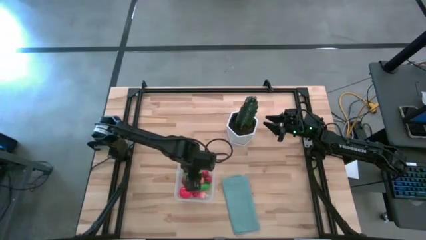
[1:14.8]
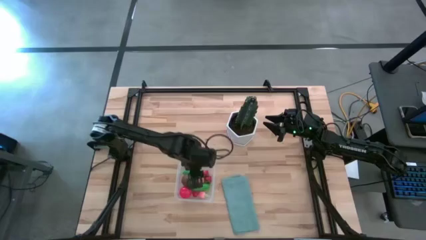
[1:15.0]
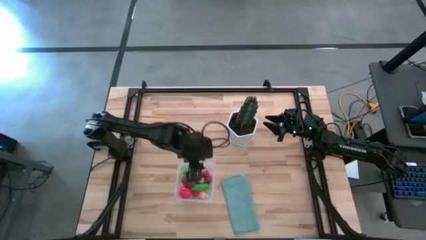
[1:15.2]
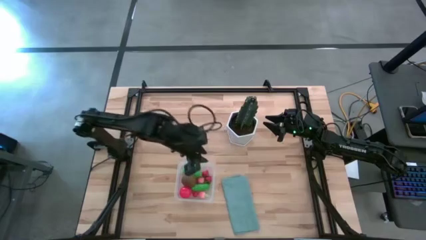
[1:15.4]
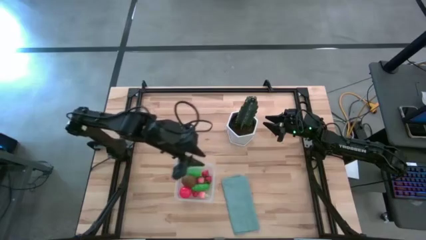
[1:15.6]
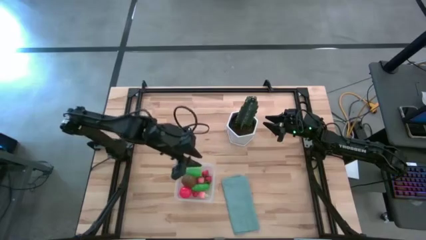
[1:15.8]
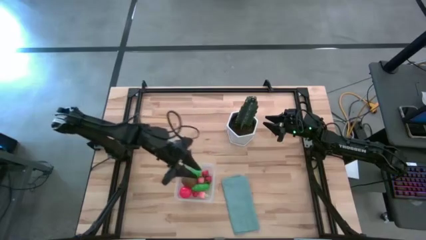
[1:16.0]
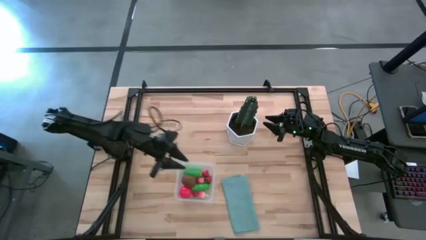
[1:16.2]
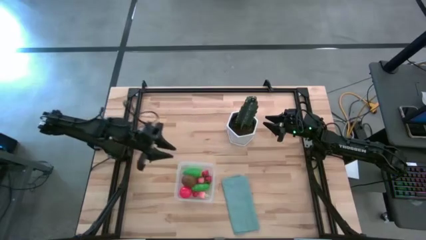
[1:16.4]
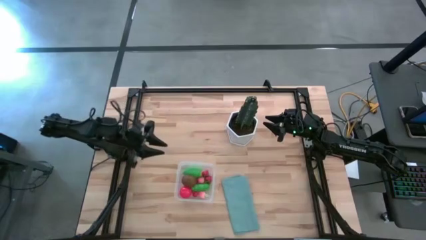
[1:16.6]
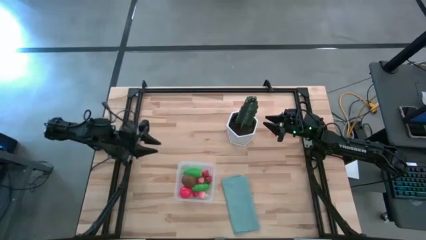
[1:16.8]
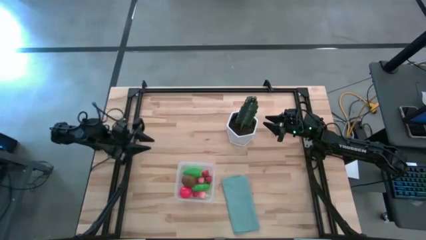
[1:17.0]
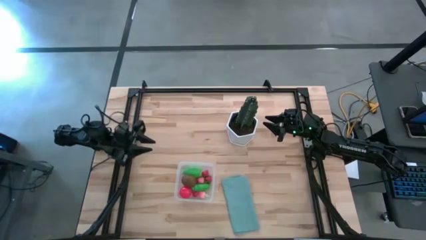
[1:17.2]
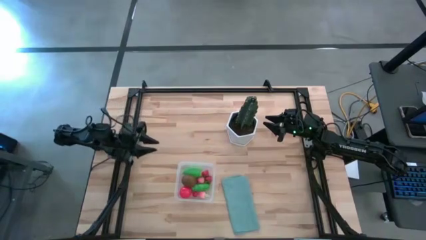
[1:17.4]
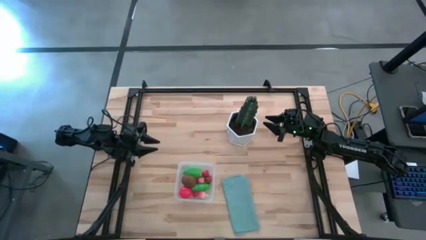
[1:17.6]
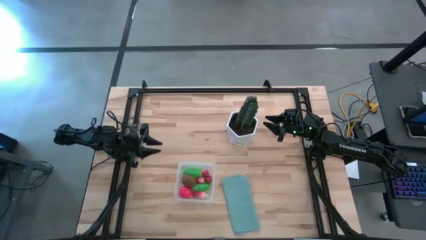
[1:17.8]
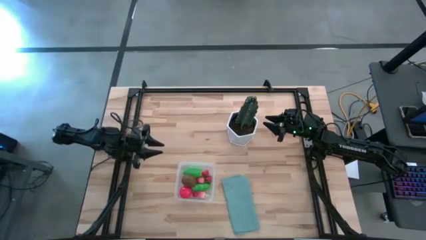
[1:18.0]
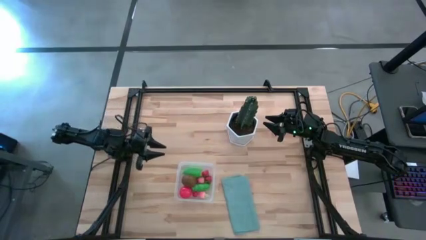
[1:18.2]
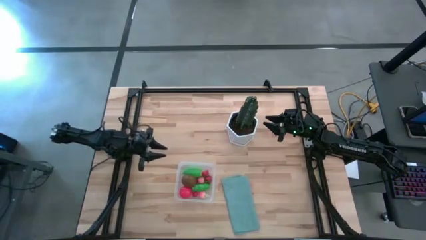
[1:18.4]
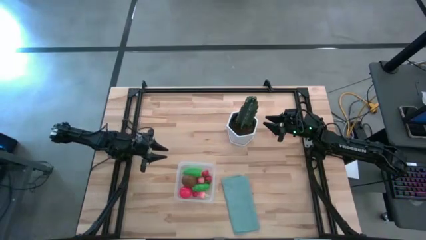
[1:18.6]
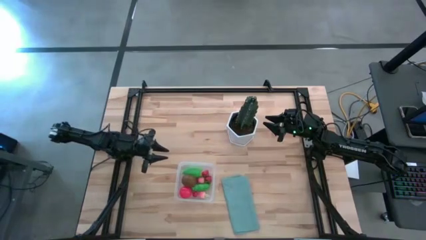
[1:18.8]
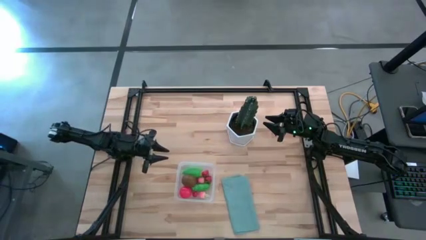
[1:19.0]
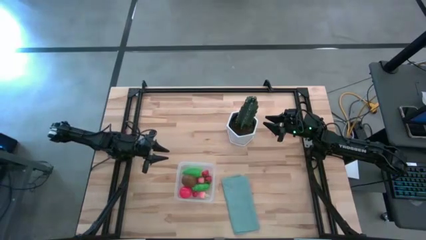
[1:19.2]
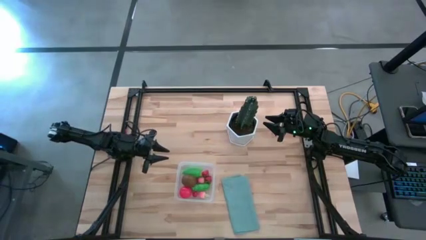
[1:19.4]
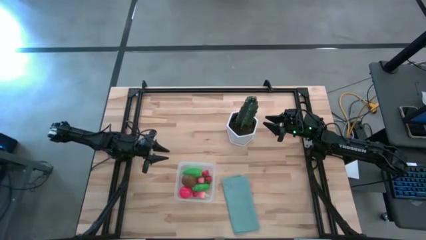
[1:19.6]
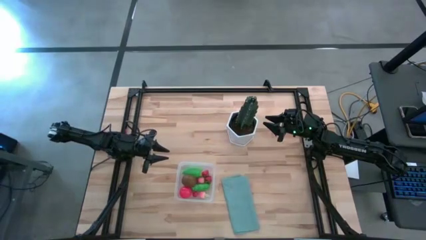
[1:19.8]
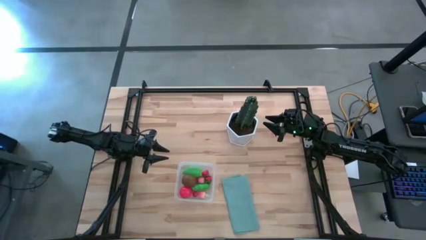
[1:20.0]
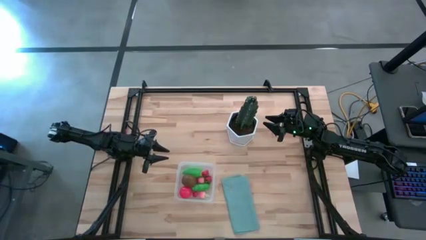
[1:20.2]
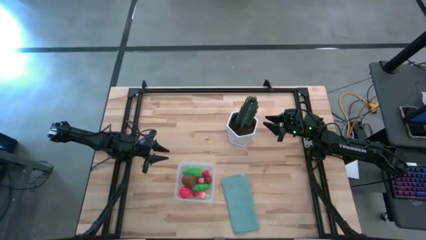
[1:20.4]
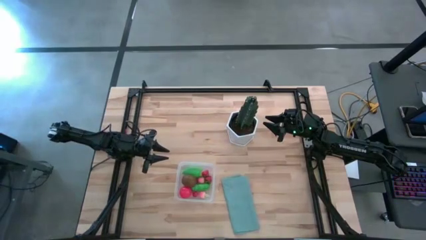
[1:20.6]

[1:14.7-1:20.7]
Task: Pick and placing Produce into tupperware
Return to Home Position

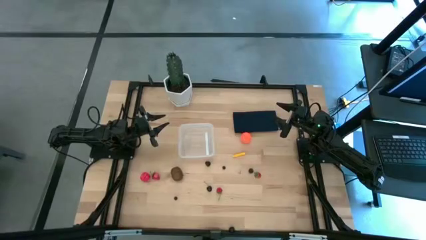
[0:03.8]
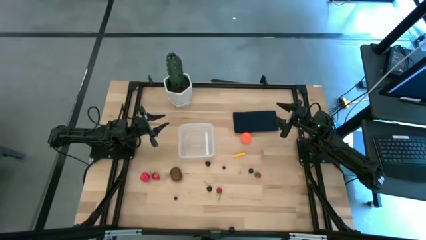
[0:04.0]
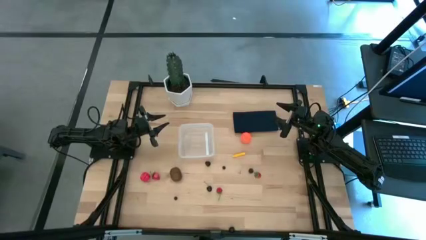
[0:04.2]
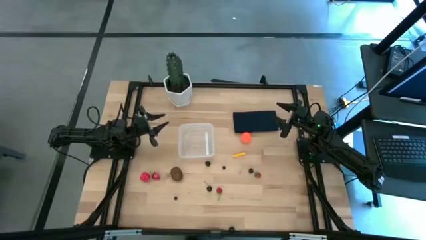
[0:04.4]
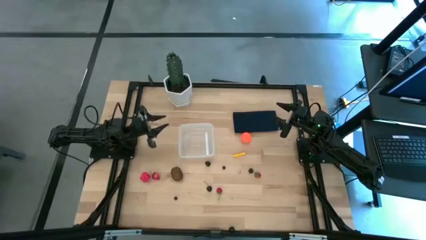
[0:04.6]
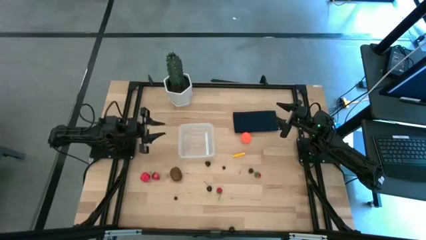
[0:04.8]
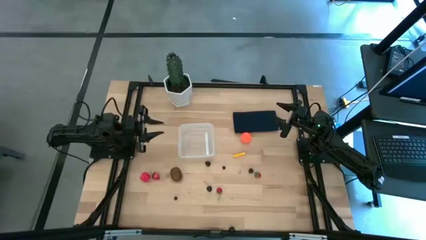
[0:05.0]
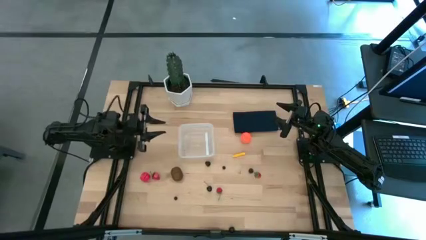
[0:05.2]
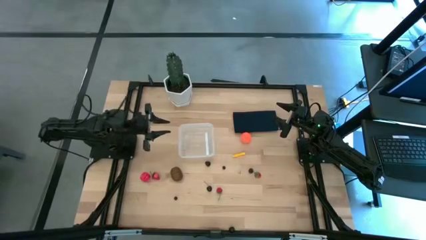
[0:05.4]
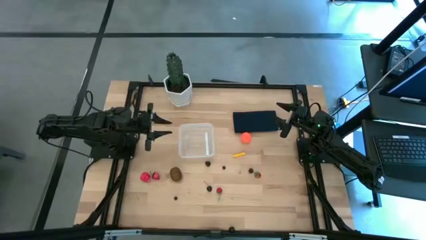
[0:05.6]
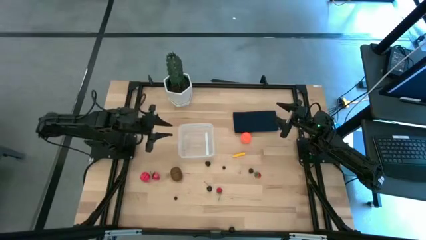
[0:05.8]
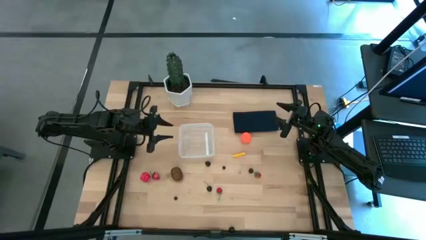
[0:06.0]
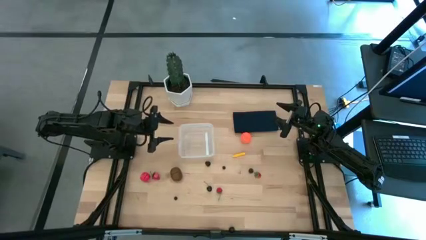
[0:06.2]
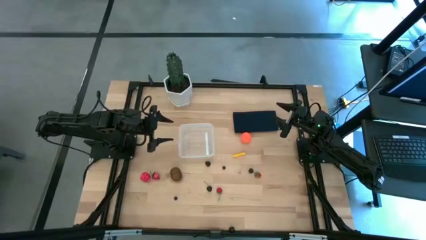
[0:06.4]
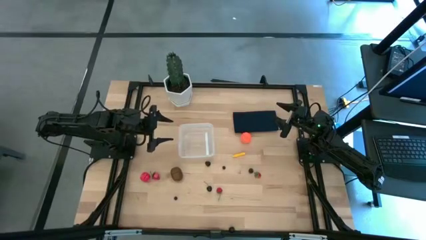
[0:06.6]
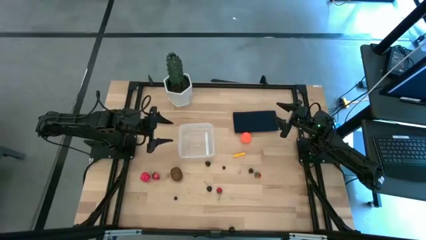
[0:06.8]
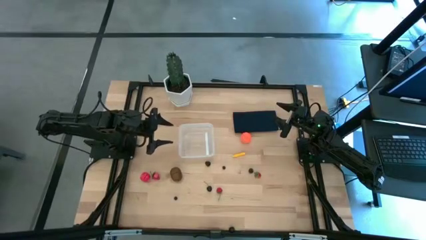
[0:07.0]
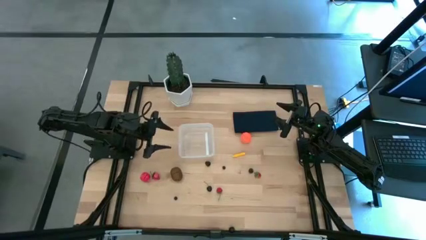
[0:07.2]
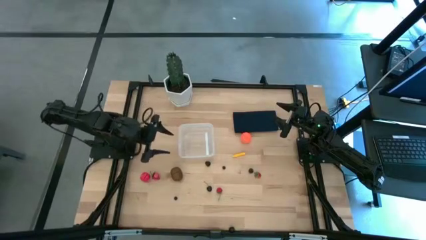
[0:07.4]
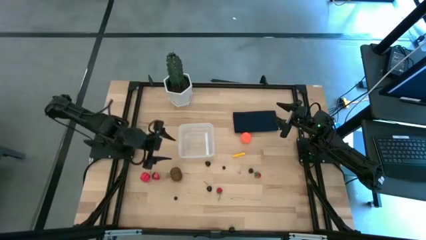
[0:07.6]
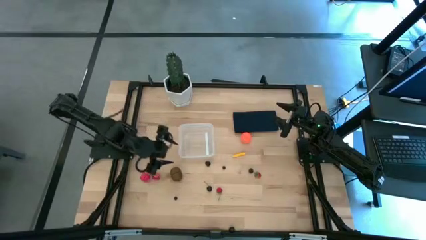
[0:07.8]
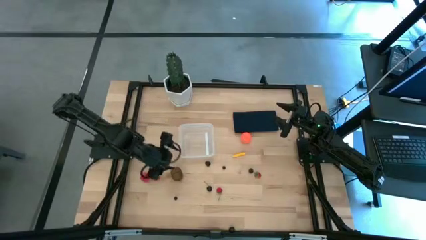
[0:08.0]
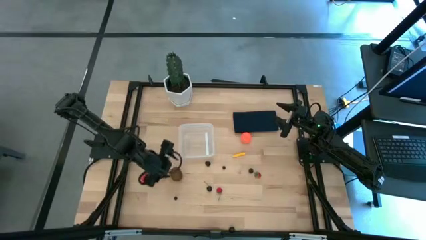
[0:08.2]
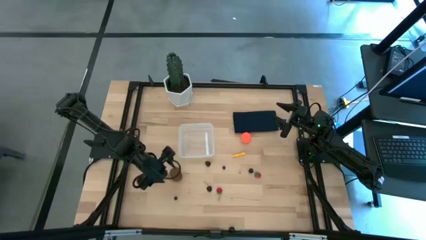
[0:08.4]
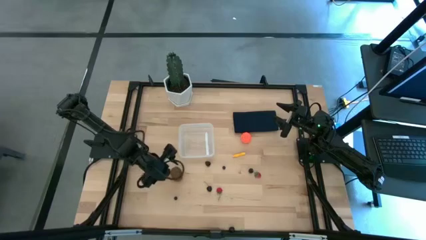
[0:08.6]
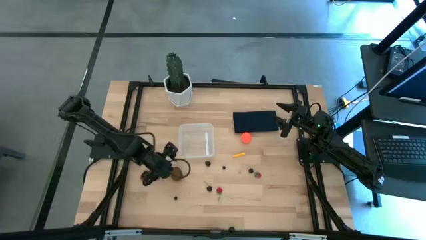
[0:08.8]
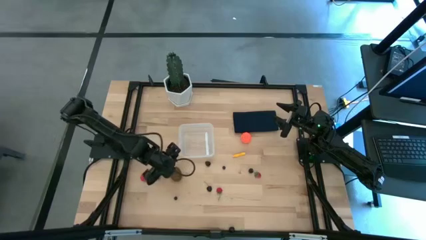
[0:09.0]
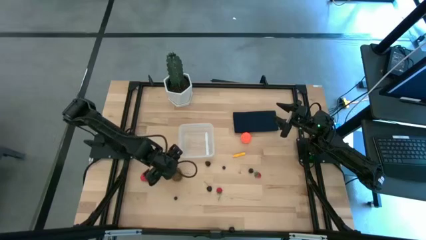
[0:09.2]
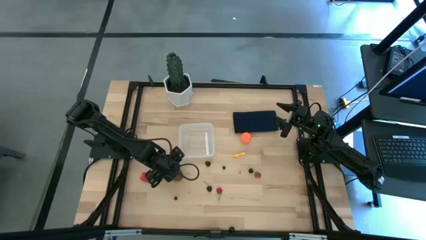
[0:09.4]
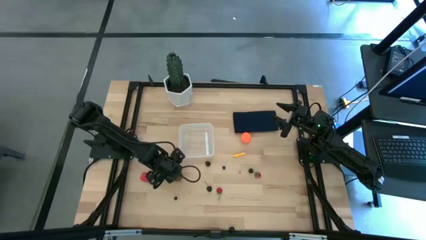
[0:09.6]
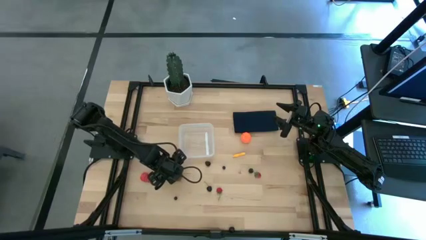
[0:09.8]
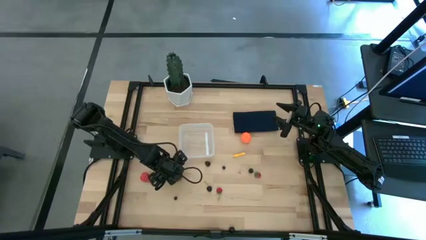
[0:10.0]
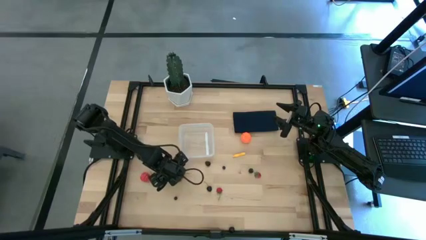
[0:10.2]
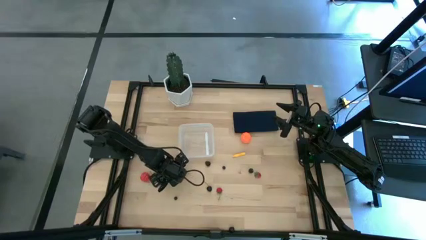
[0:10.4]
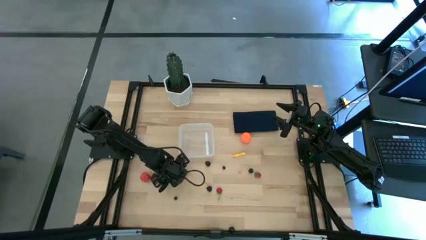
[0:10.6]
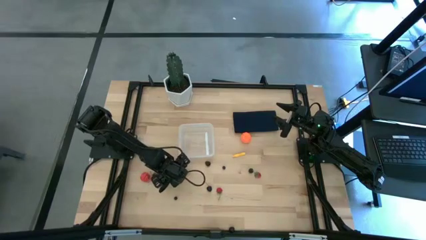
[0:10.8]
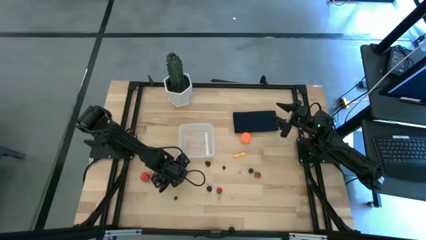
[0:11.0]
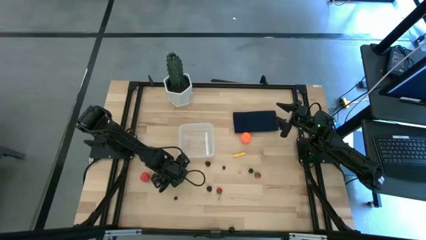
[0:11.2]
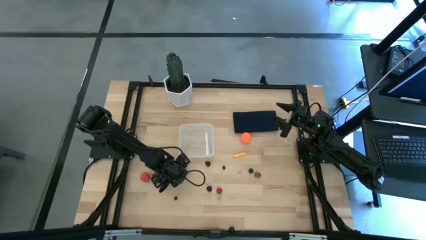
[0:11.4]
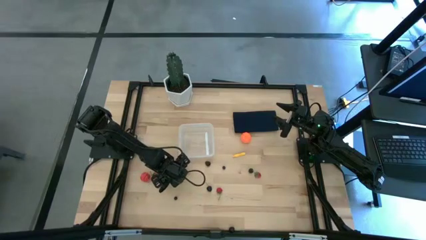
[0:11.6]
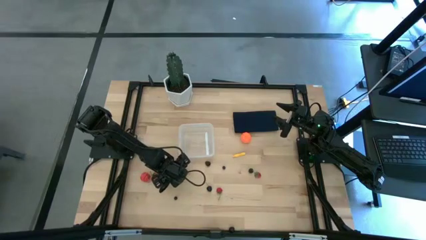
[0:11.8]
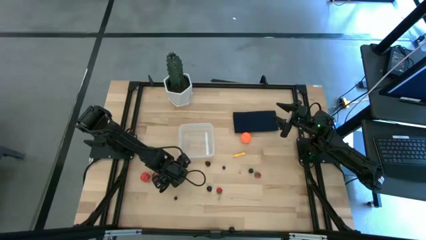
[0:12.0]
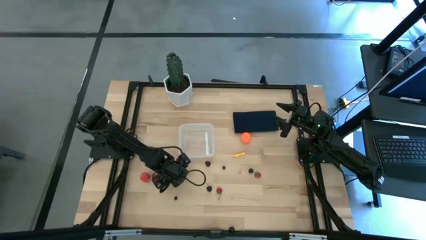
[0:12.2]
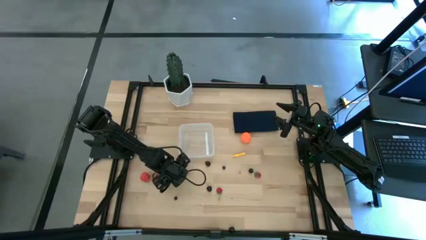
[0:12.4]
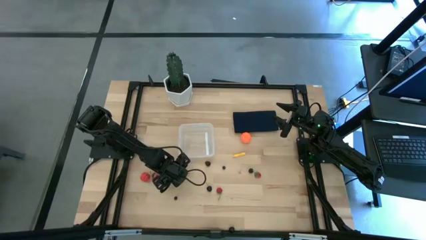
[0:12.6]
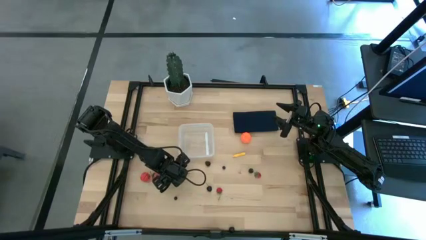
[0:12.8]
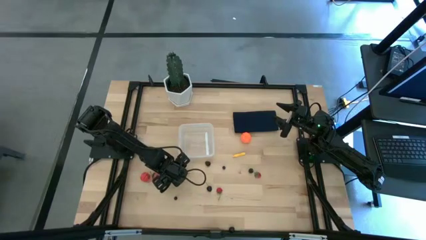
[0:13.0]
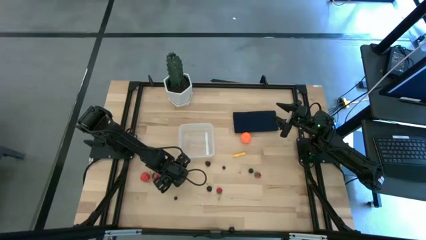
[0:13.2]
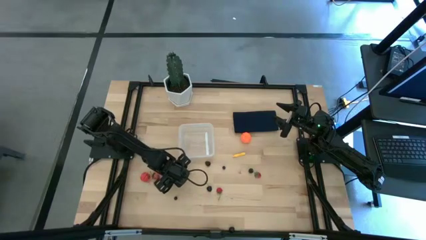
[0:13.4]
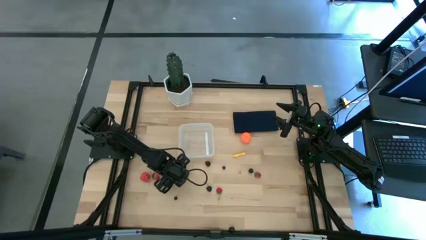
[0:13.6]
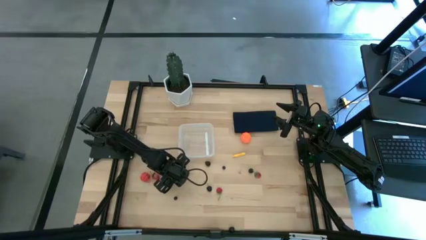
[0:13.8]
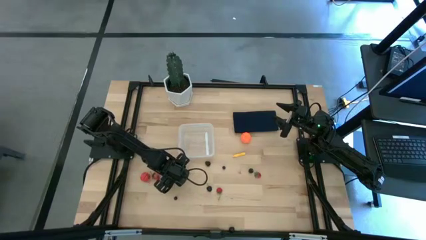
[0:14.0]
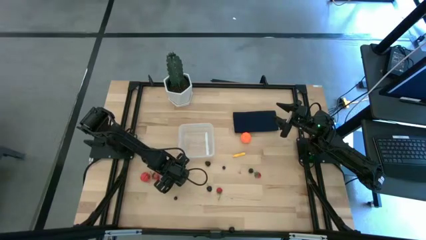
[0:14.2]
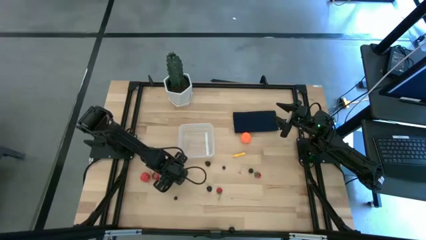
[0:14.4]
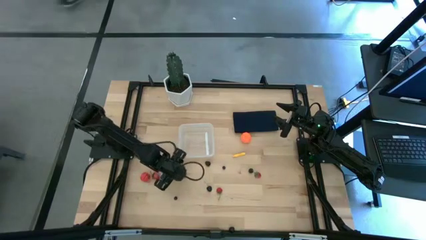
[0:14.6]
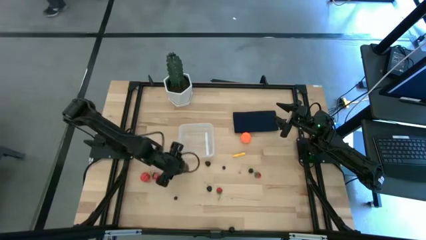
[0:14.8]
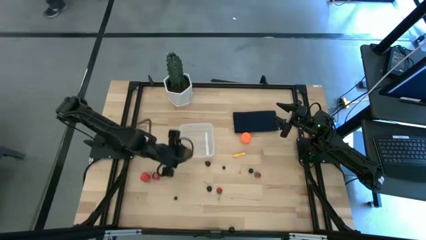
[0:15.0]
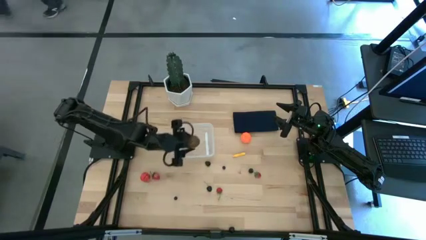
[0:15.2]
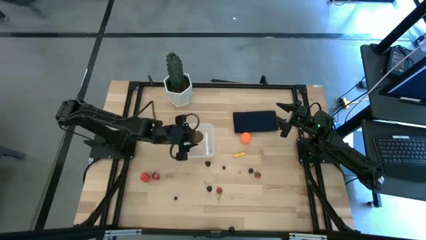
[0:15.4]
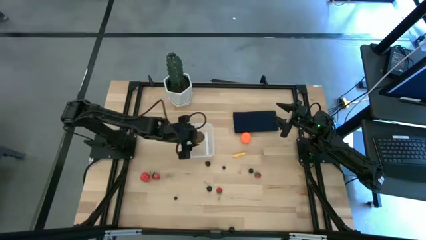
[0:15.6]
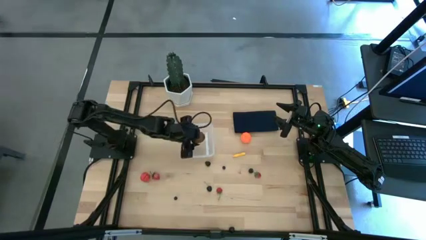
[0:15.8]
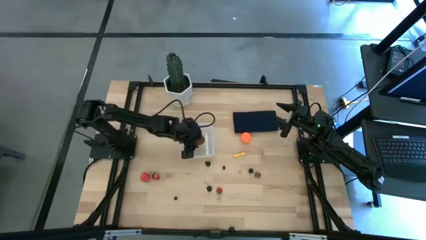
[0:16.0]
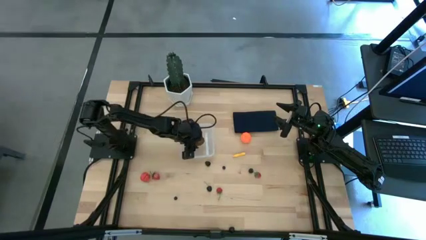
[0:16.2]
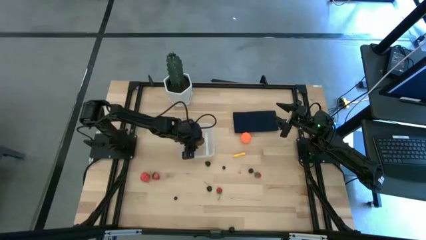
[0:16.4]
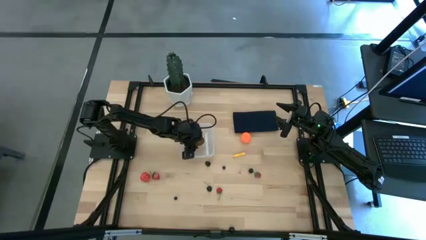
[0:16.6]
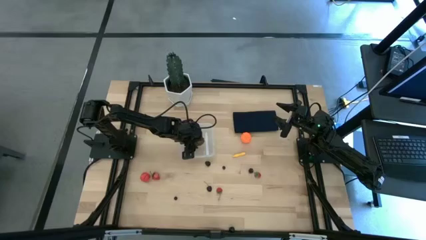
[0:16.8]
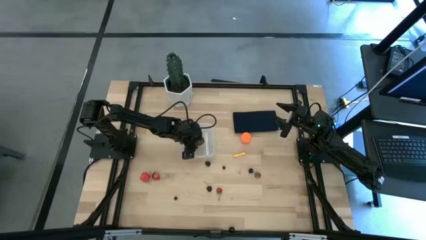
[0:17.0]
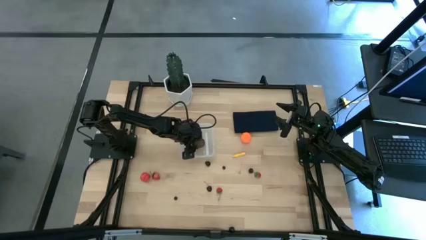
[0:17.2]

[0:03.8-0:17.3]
Task: Pick and placing Produce into tupperware
Put the brown kiwi into the transparent container
